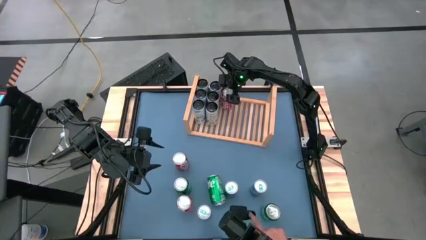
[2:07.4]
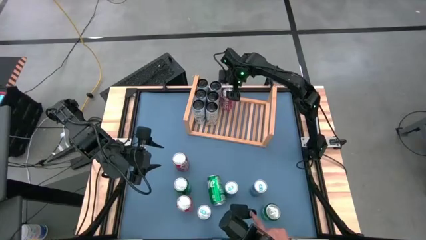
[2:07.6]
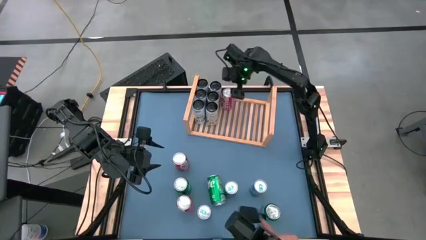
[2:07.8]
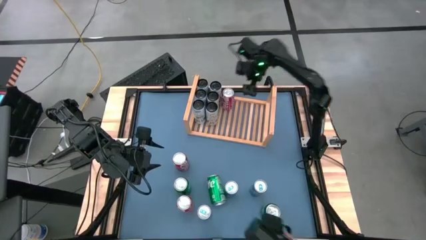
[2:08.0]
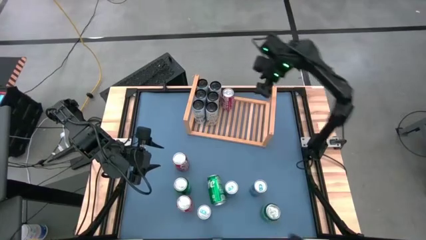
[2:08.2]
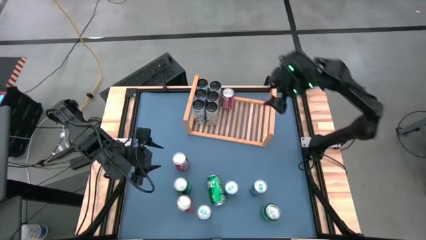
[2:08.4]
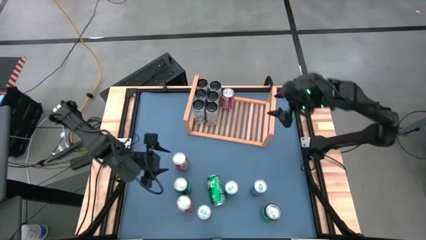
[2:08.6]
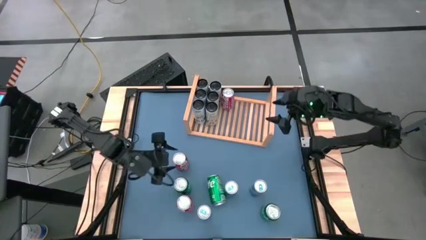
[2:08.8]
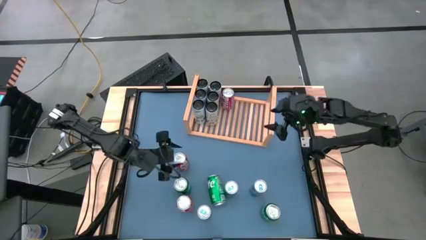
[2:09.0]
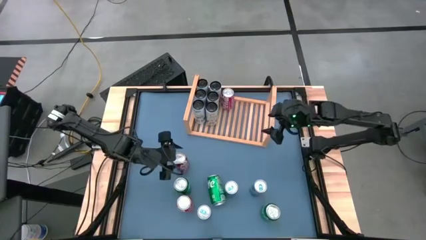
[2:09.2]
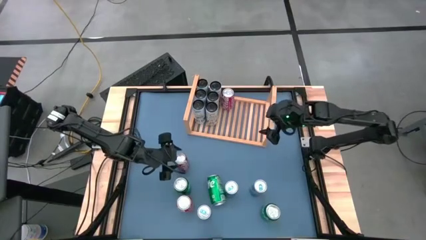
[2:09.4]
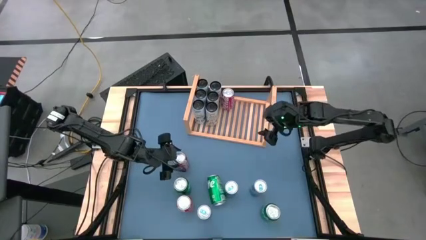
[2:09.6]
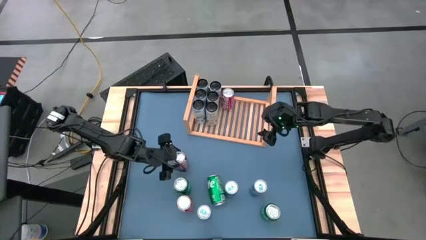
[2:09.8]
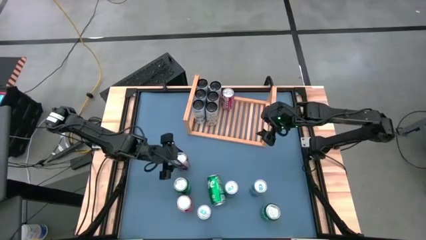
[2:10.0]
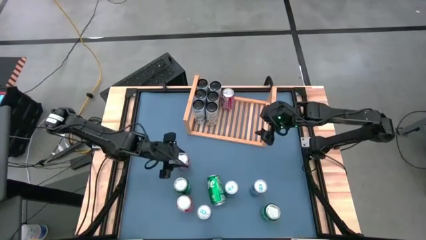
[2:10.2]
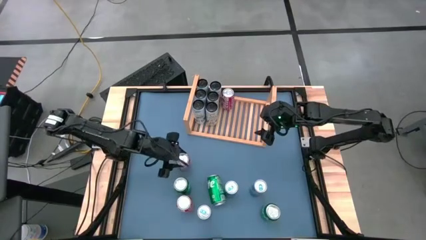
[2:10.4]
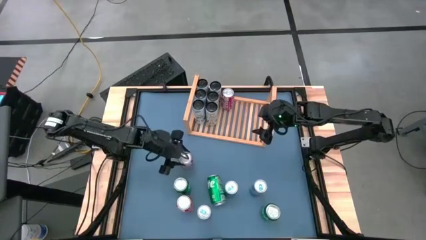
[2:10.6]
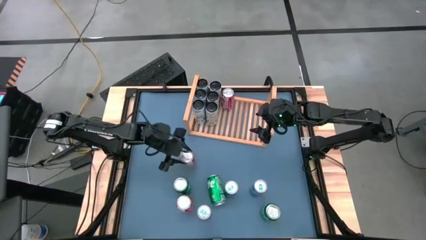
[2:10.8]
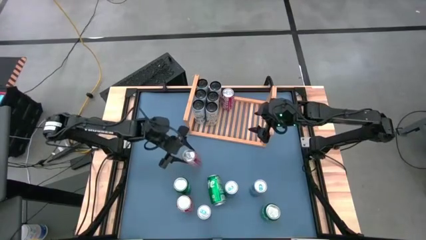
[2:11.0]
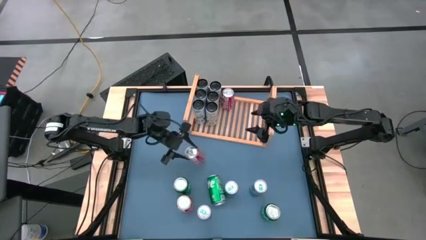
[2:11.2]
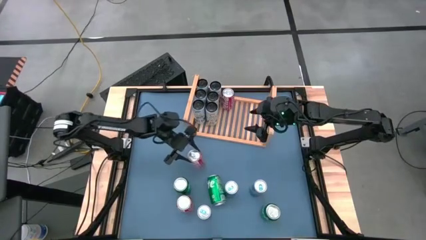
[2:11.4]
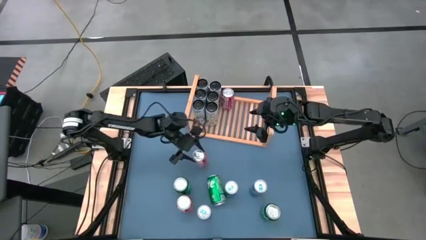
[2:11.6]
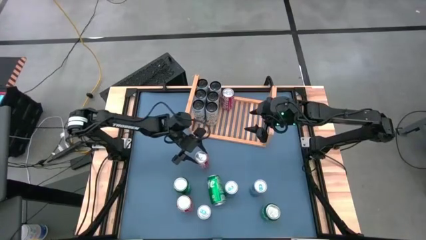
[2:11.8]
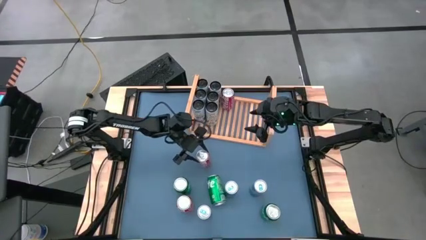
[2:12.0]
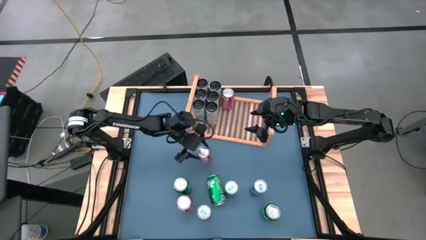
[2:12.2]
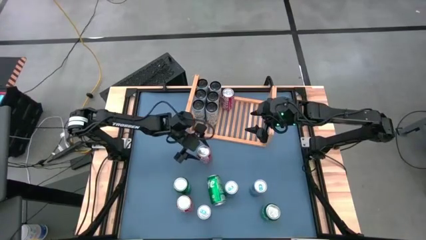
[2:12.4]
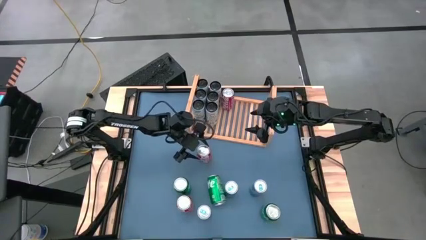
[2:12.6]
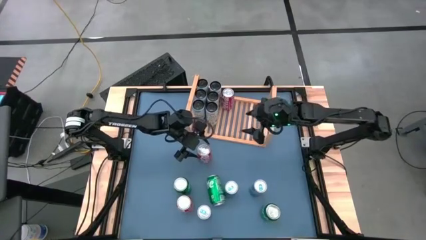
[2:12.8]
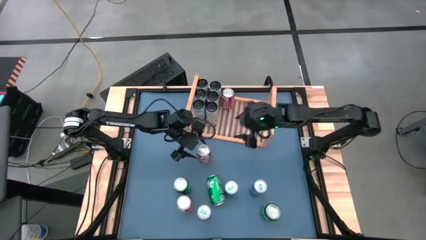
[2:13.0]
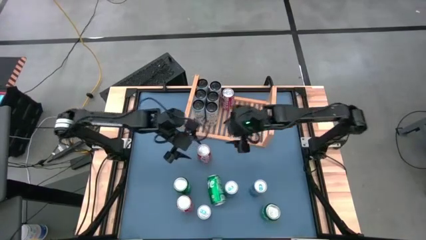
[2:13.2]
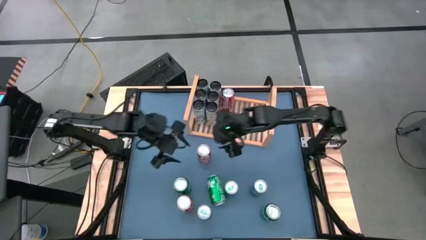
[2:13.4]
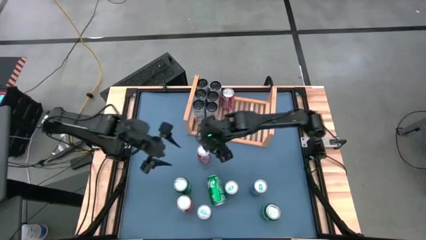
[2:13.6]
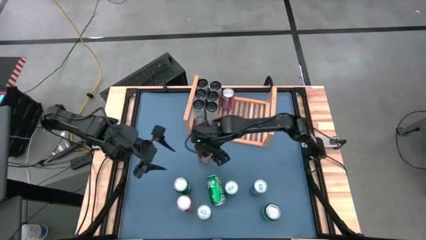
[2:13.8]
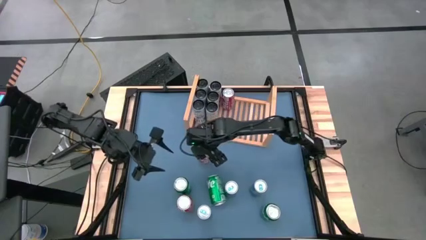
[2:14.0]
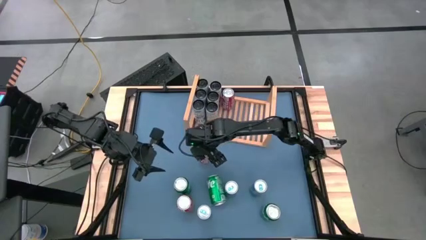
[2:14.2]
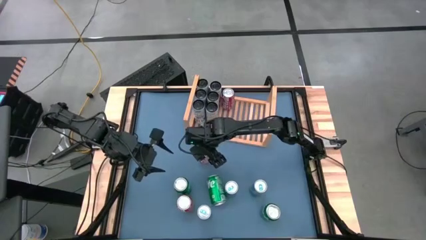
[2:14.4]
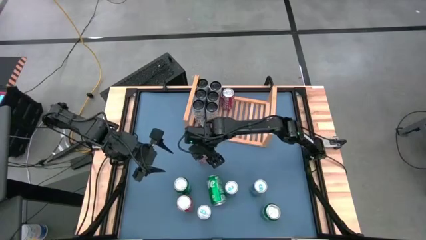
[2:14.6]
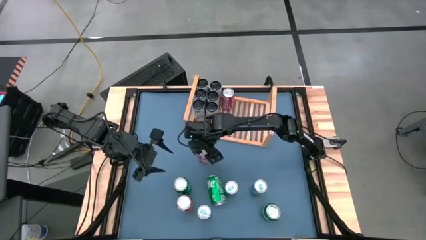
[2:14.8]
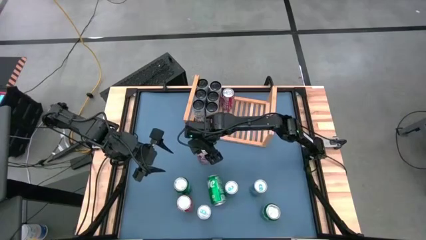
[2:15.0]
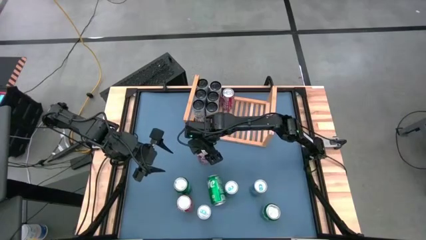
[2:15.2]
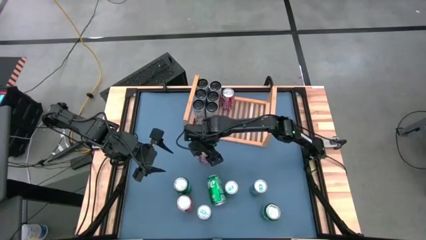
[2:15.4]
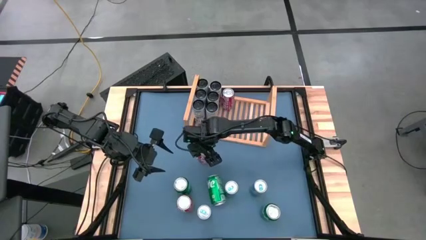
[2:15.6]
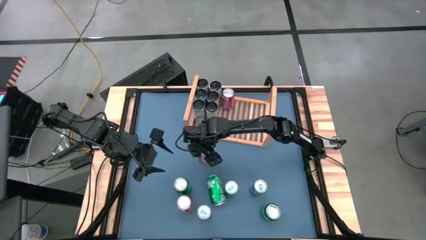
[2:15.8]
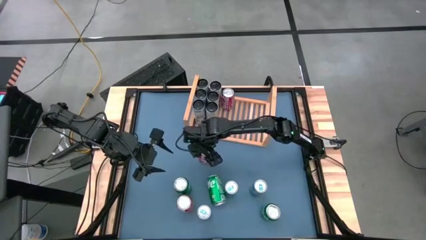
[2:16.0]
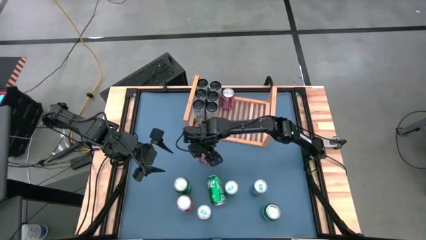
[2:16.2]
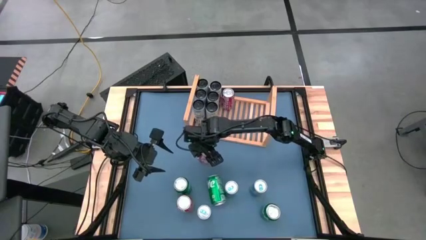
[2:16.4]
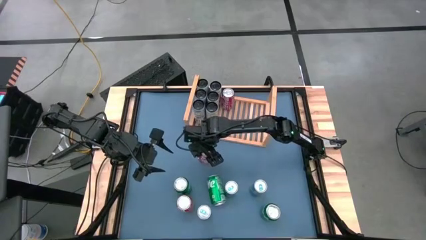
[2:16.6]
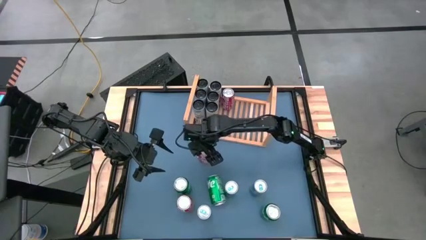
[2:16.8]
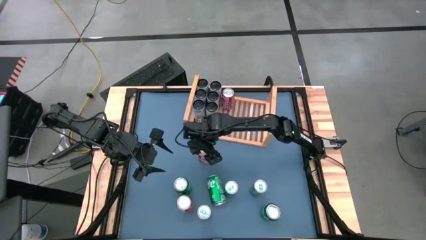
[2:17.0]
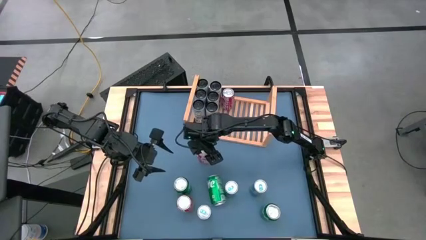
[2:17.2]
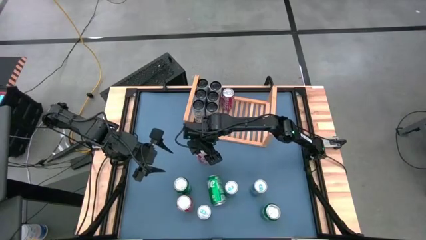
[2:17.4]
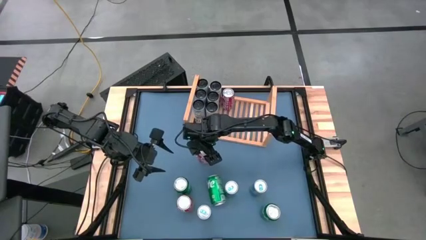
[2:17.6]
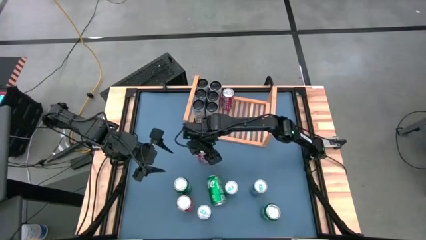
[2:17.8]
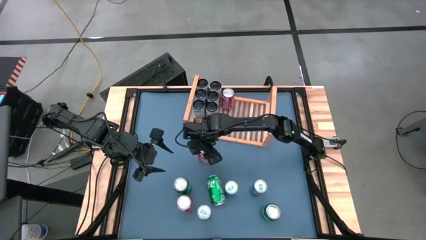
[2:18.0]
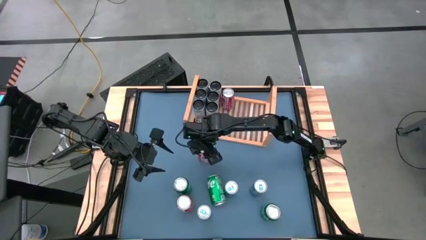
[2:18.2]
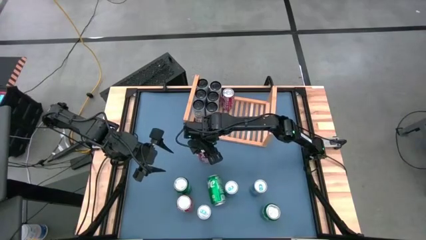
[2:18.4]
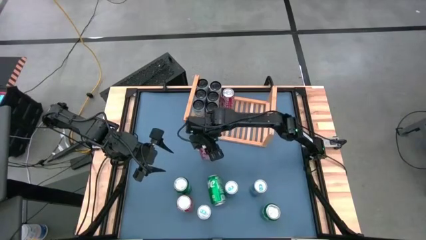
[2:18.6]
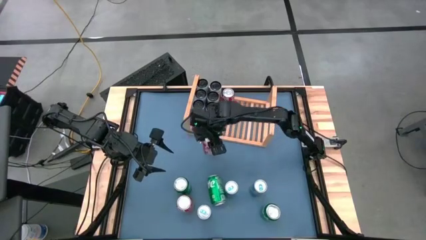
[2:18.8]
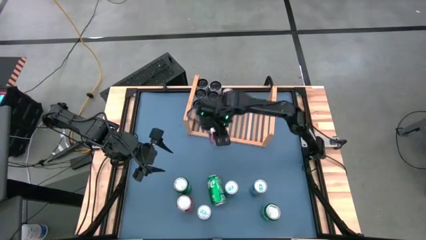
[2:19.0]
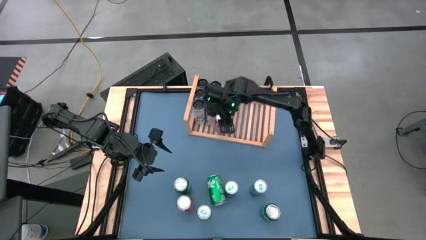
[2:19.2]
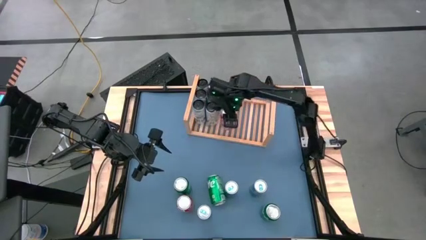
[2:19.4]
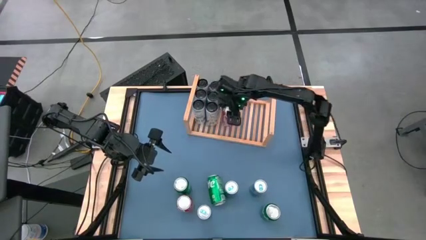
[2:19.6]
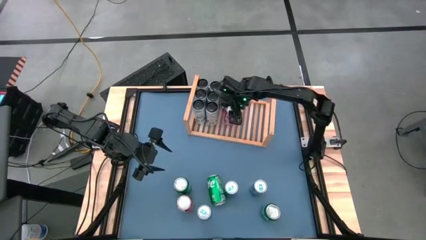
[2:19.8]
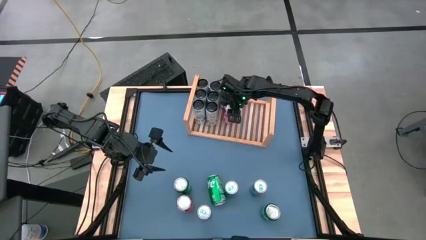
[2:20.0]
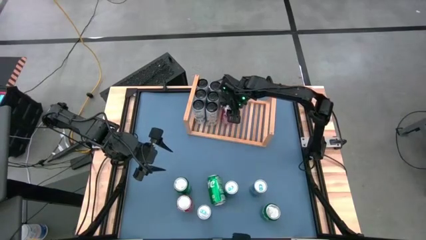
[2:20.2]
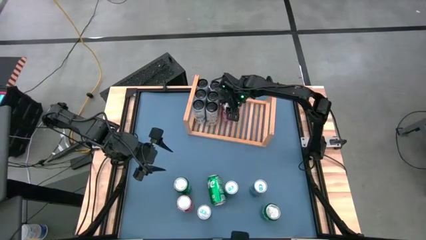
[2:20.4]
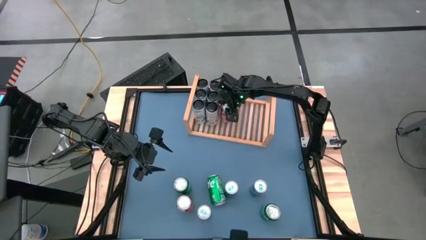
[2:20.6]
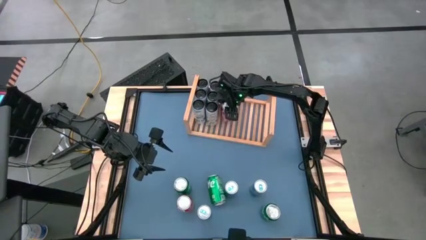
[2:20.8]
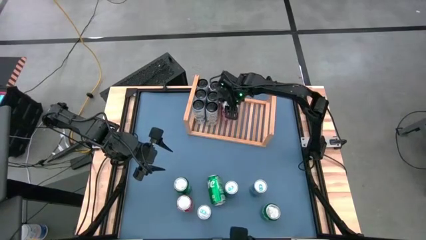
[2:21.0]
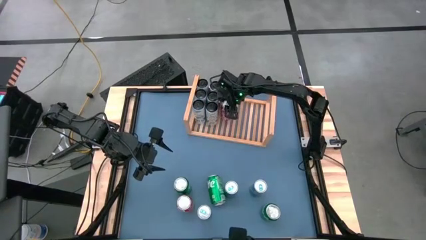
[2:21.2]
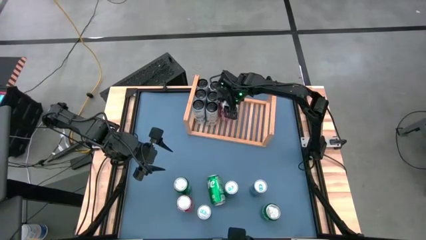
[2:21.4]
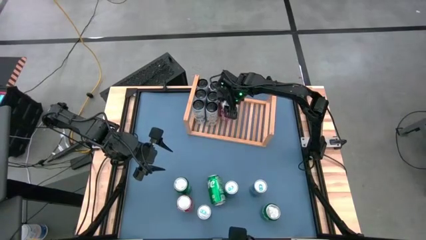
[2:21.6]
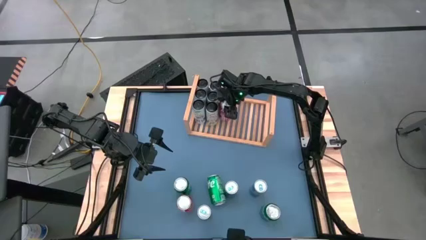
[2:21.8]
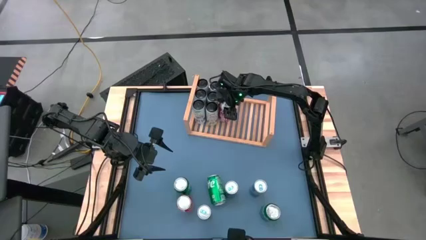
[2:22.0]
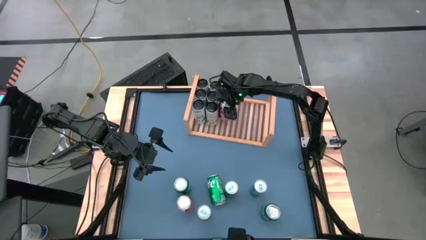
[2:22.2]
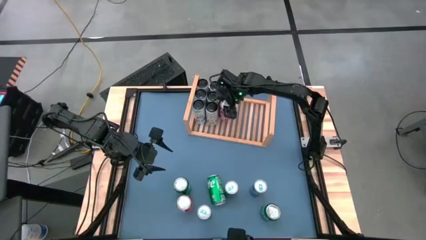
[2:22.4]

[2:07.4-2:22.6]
Task: Place canned beverage on shelf
Put the red soda can on the shelf aligned with the other red soda can

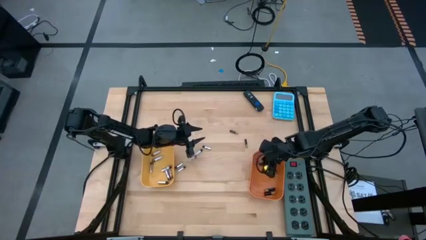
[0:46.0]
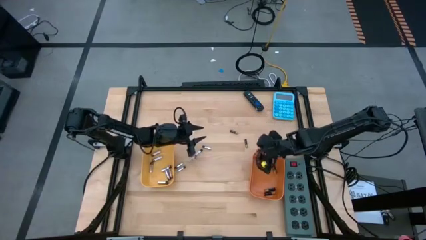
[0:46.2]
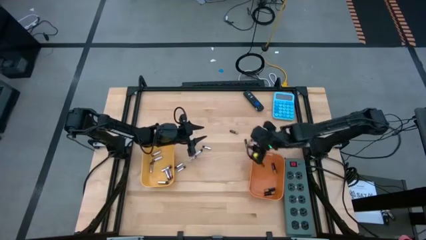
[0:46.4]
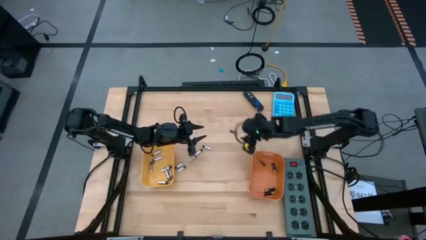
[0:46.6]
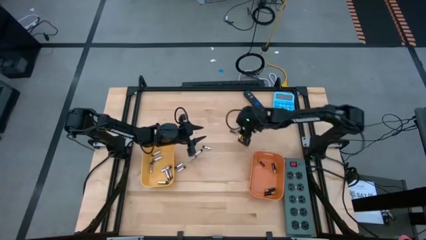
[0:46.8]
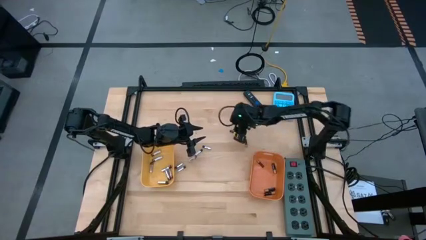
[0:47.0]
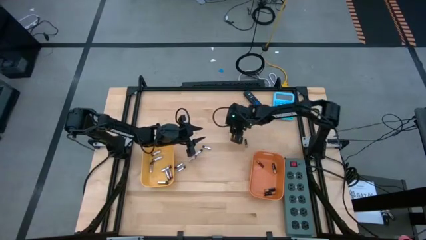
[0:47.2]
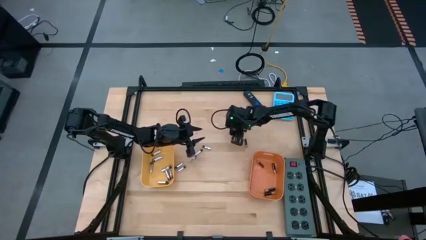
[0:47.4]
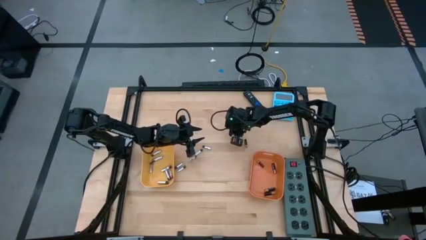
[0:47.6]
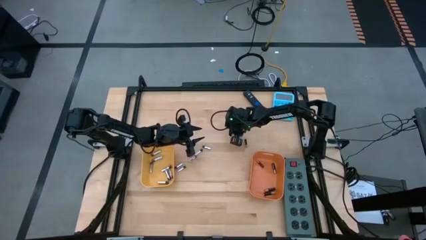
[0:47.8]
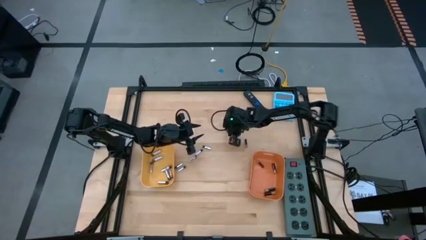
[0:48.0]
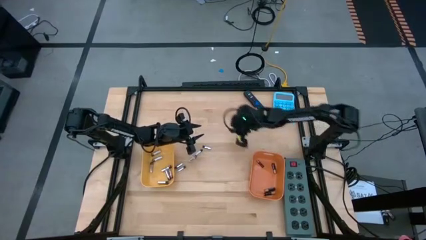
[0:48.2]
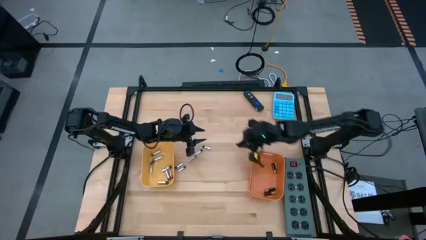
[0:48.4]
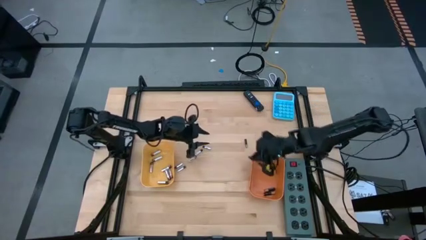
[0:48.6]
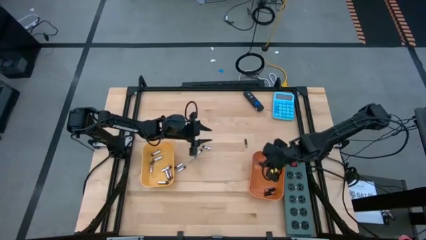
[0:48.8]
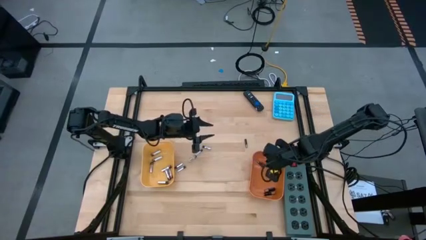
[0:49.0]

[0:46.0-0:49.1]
Task: Sort batteries
Put the black battery into the orange bin
